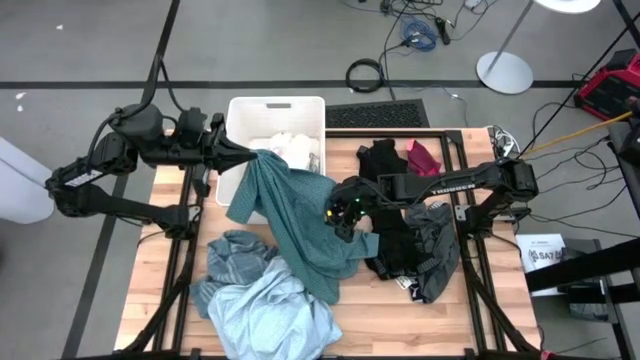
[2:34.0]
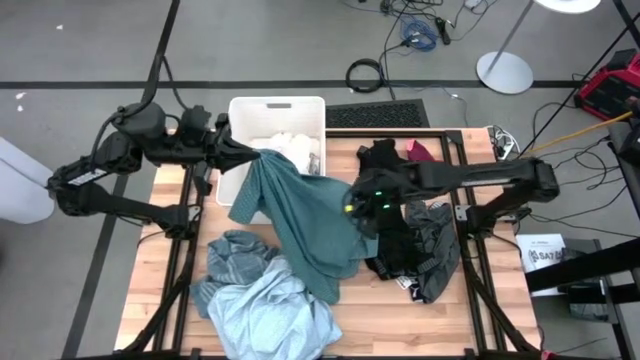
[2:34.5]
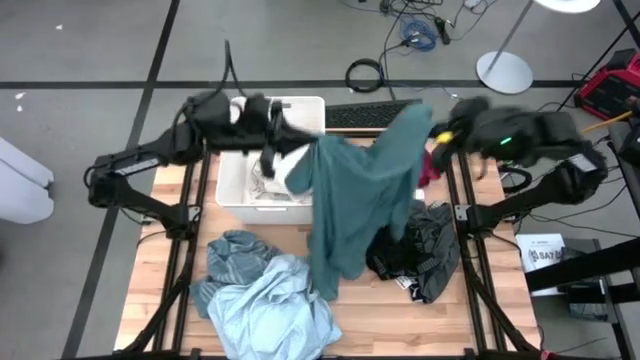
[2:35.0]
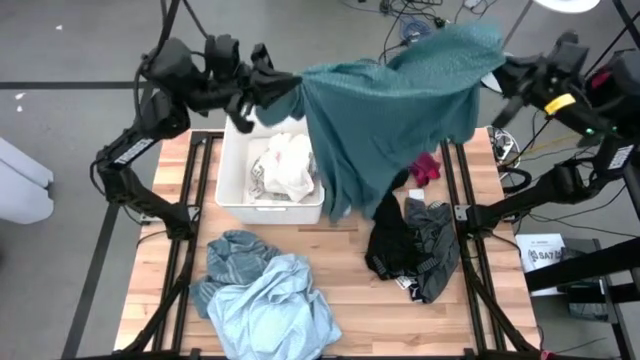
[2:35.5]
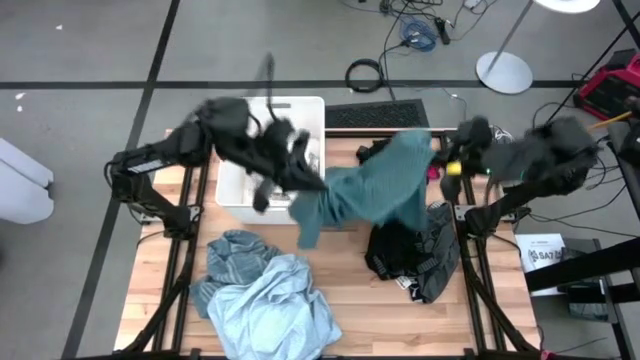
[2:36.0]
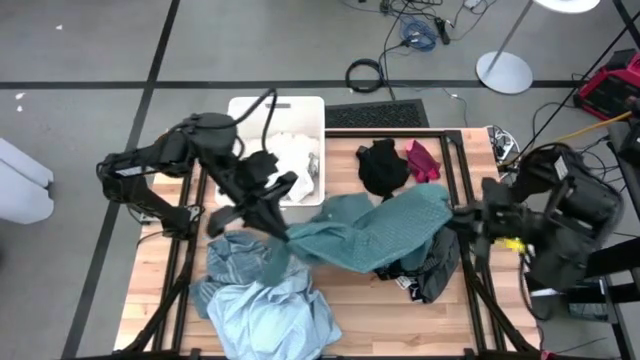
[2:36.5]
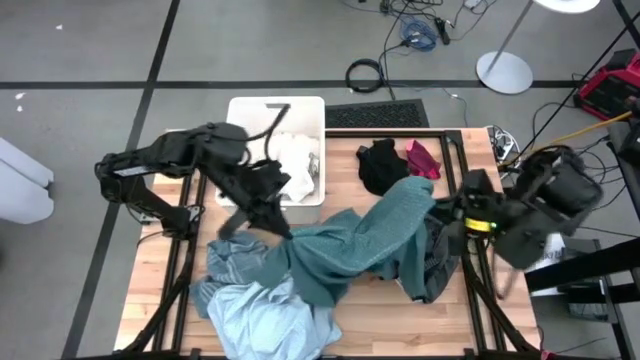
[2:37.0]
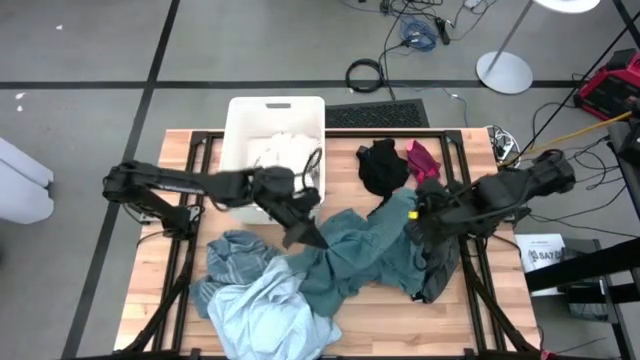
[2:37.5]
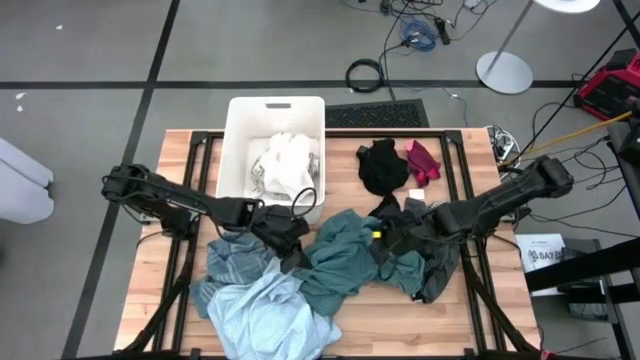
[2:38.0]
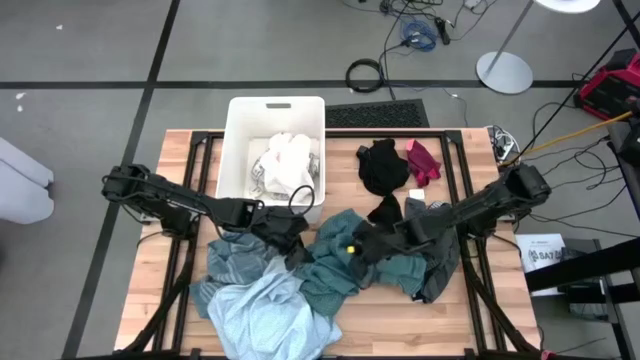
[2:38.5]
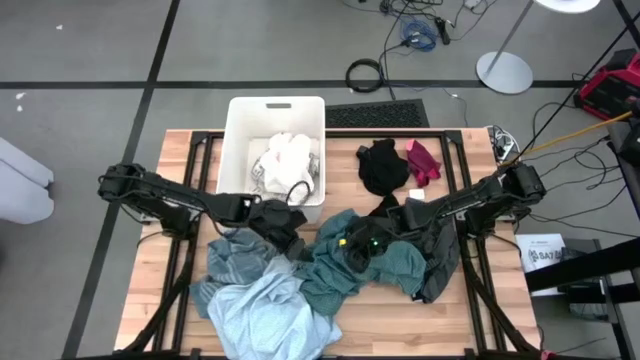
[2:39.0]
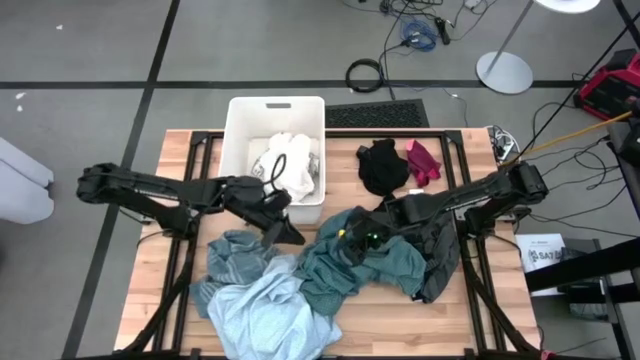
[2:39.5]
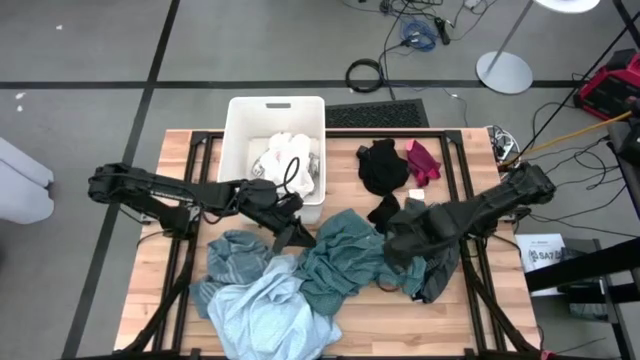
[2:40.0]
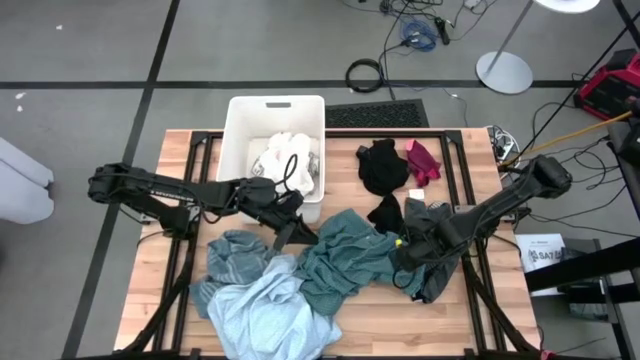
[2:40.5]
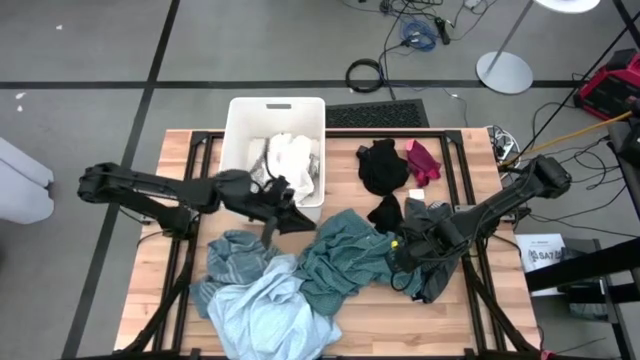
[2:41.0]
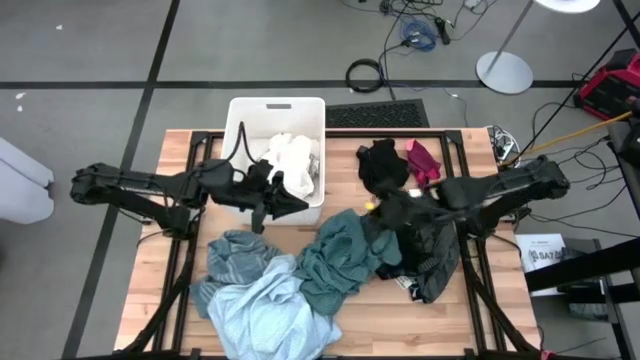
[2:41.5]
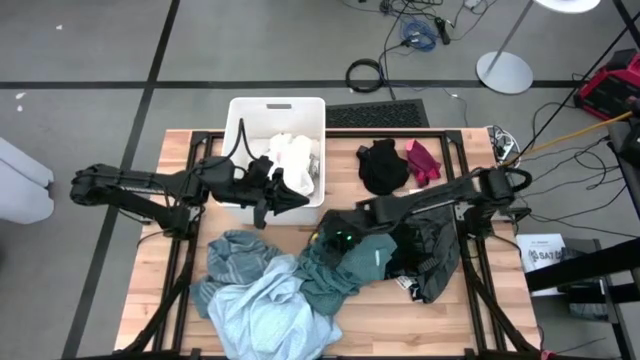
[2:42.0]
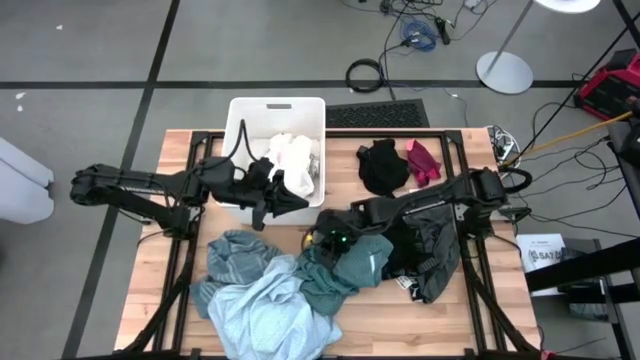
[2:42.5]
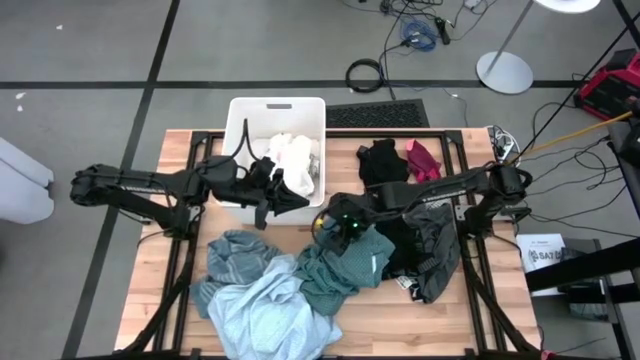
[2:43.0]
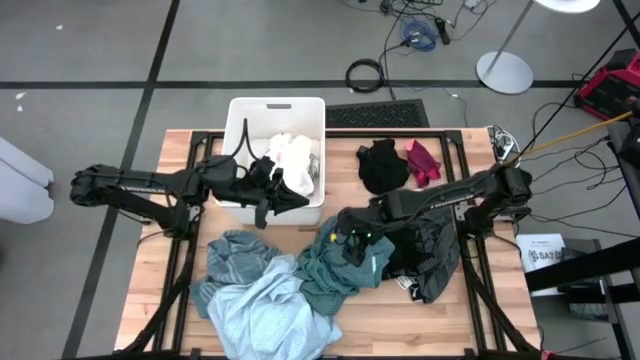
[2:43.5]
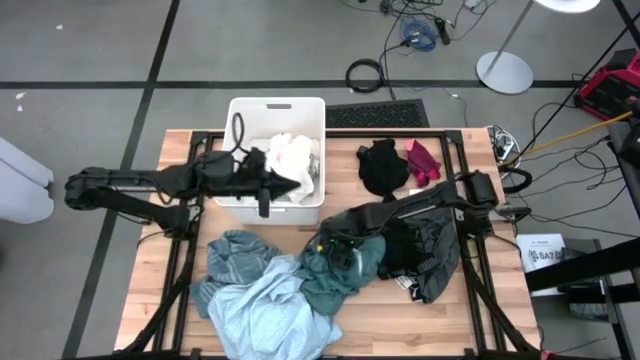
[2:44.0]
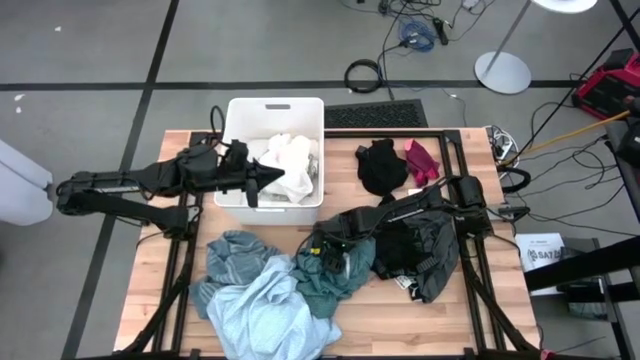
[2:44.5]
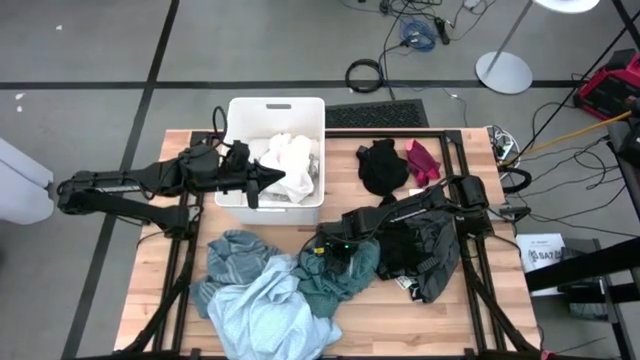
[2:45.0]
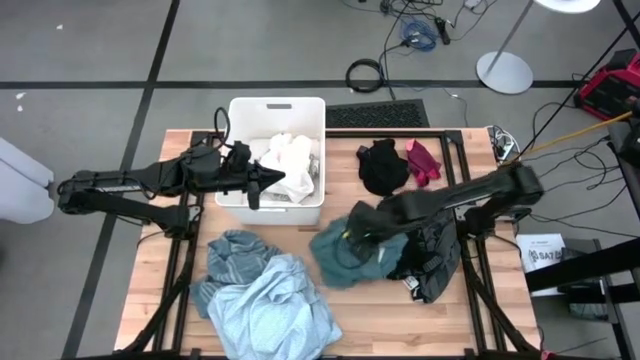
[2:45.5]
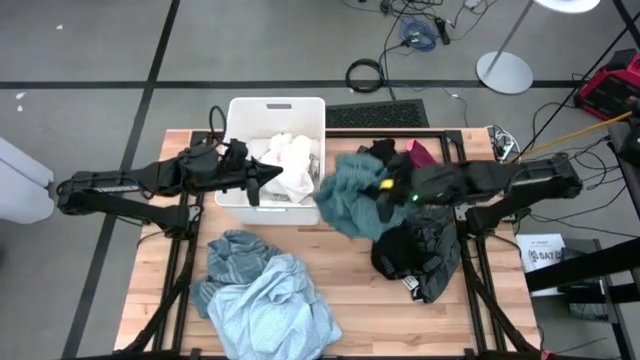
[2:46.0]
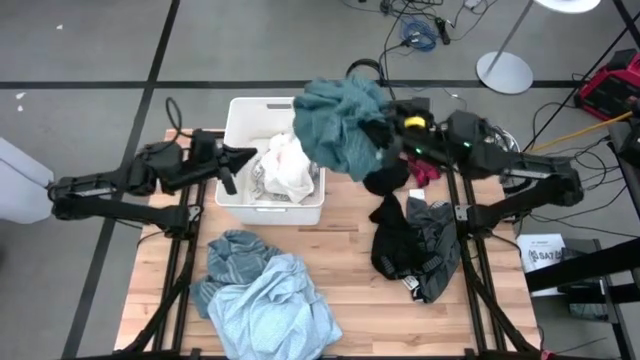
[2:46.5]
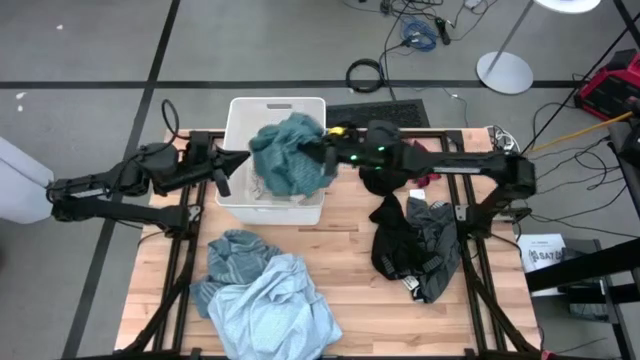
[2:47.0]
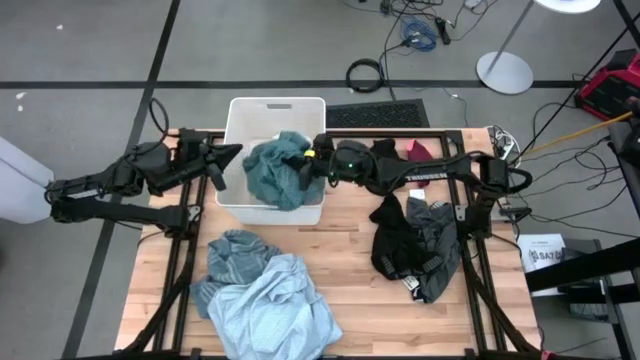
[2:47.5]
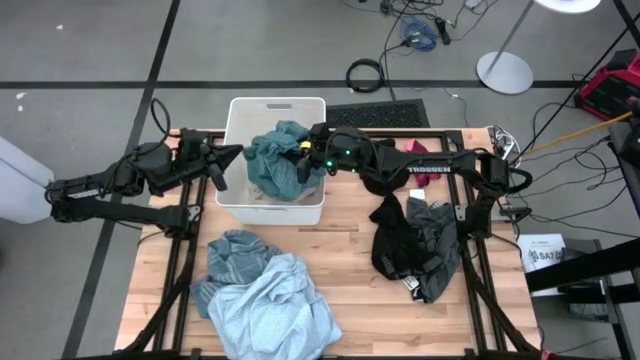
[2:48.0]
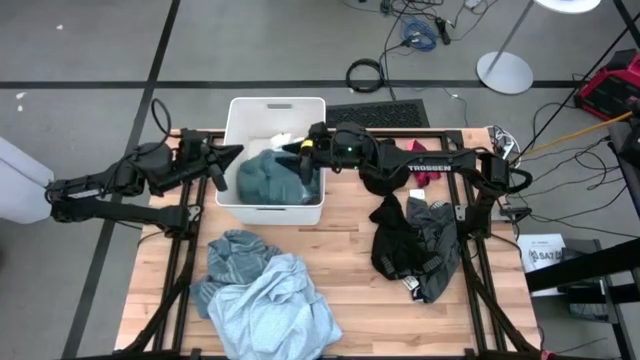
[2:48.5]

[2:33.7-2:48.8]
Task: Sort clothes
Put the green shirt into the white laundry bin

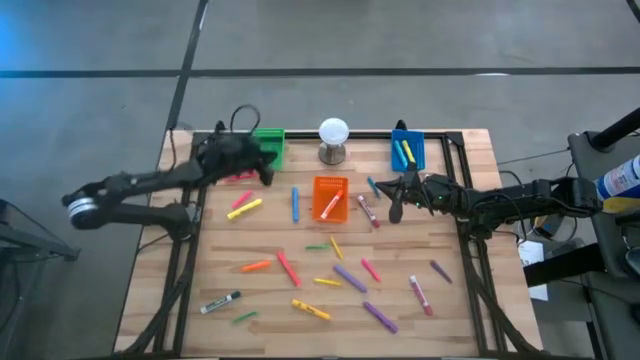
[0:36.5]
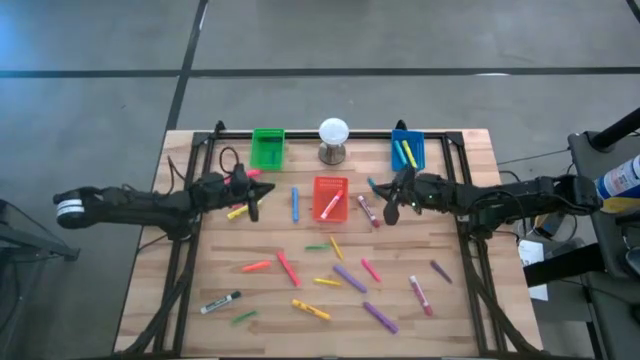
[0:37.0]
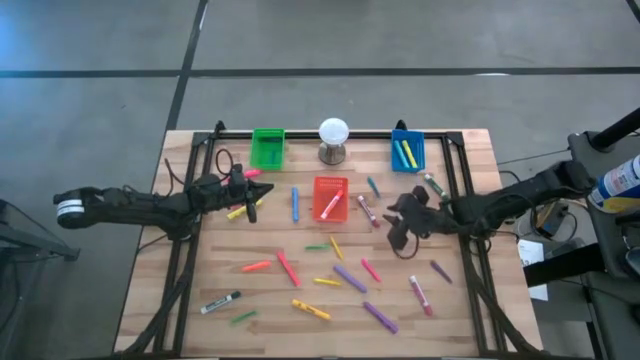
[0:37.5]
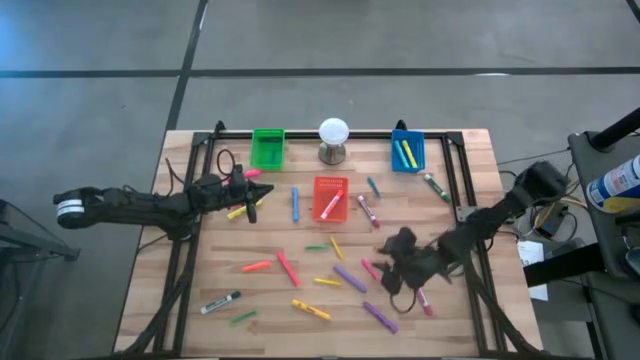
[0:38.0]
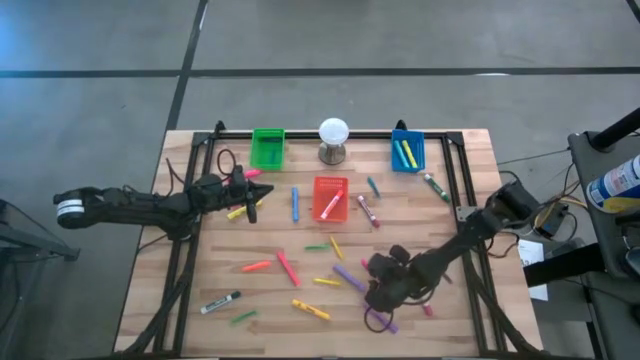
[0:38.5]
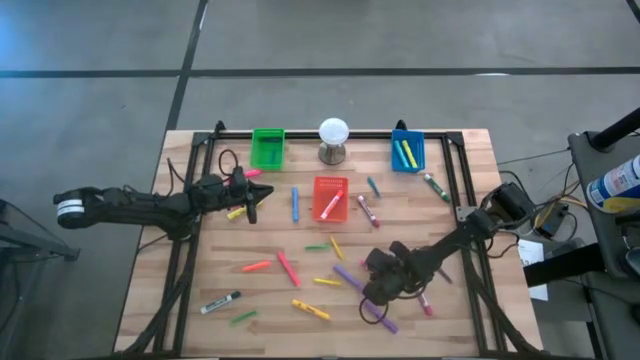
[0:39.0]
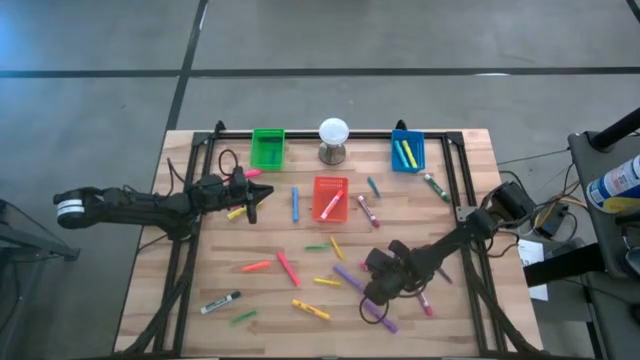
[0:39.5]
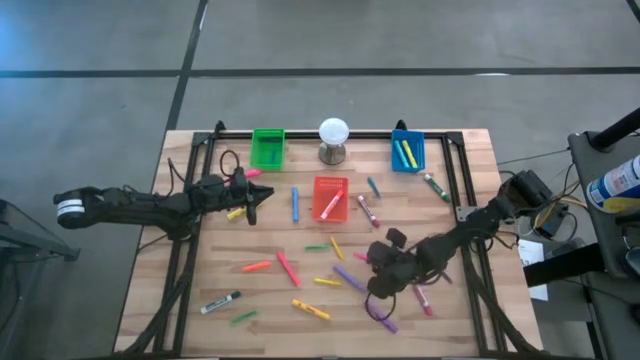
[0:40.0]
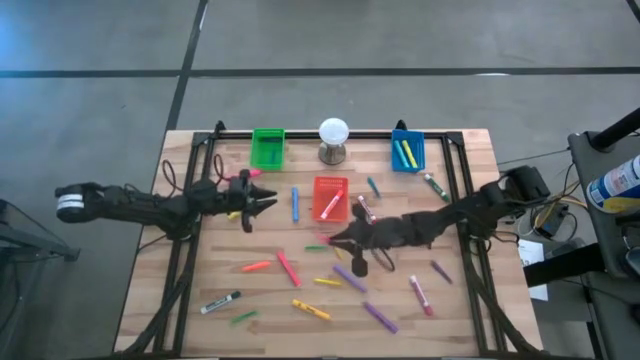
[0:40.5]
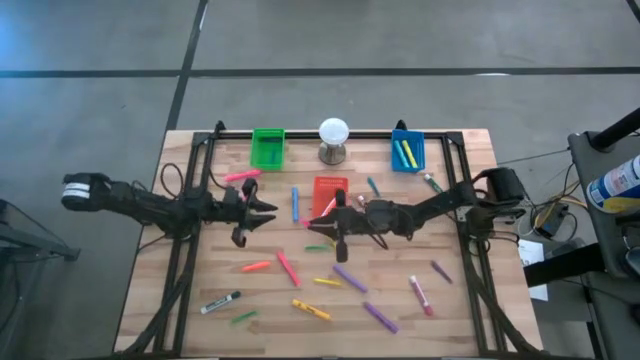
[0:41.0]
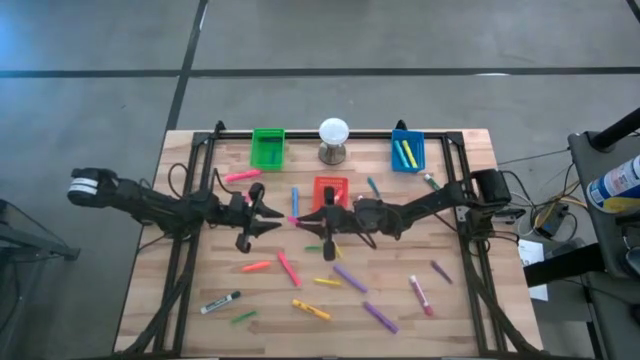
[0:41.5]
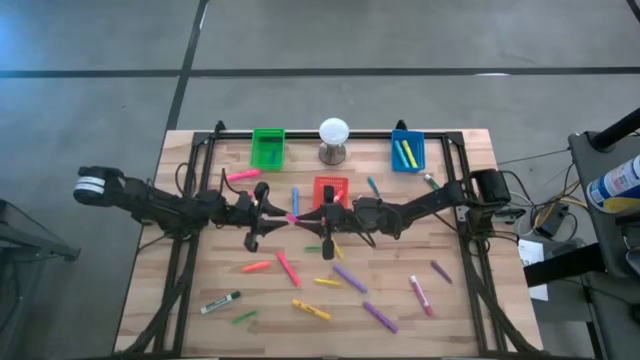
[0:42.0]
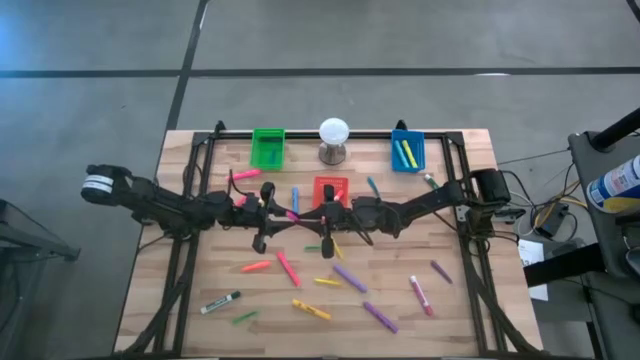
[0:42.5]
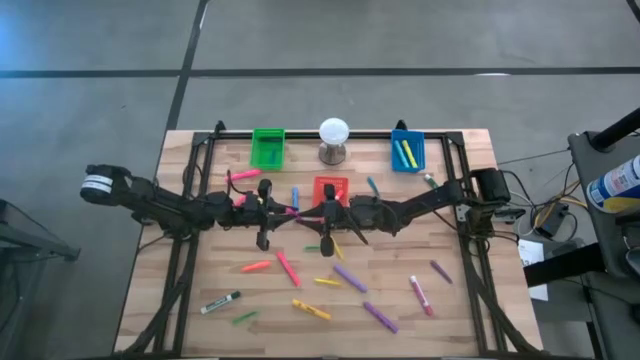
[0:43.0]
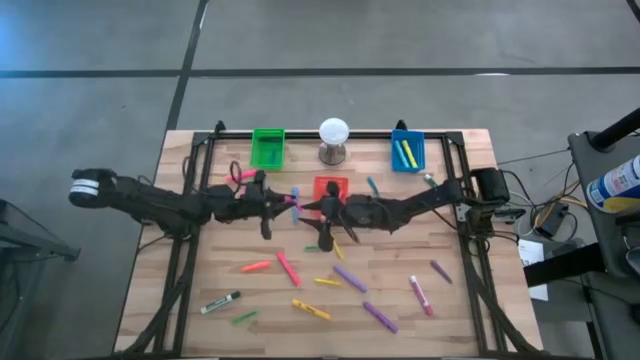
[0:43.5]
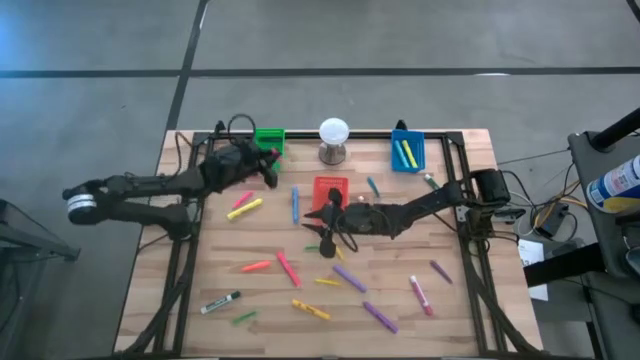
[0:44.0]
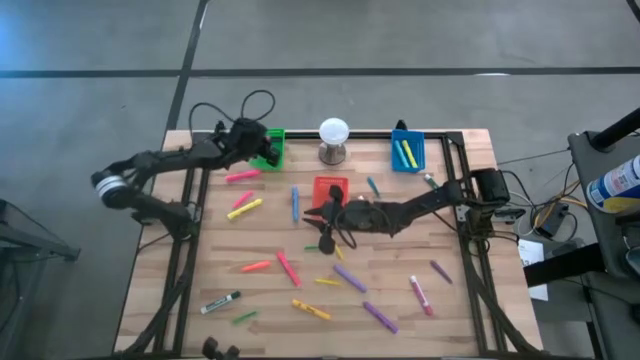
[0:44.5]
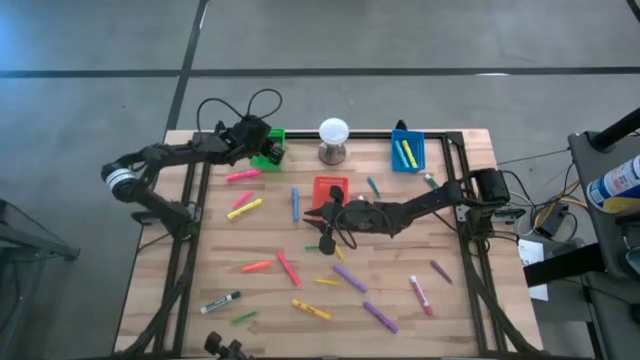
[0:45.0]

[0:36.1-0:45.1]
Task: Pick & Place Markers
Put the bottom pink pen into the green bin
